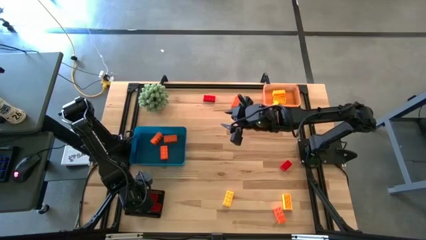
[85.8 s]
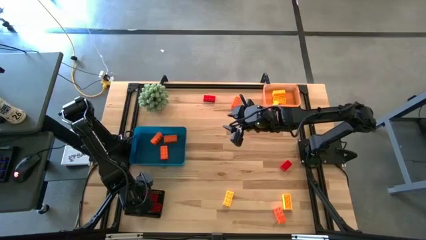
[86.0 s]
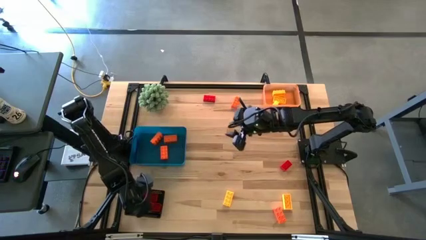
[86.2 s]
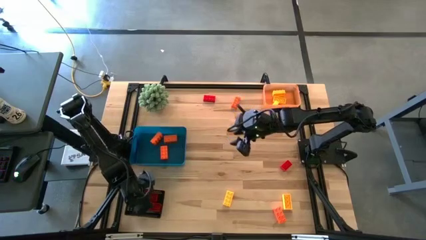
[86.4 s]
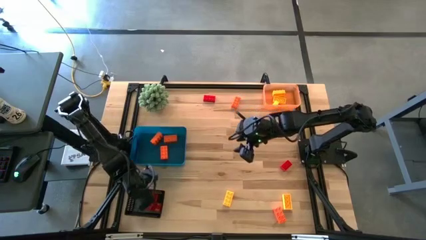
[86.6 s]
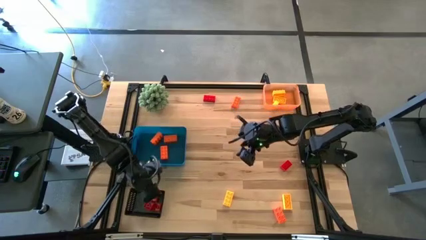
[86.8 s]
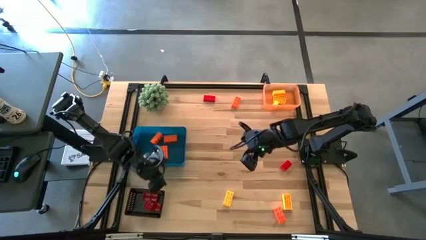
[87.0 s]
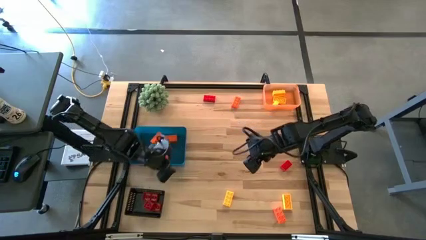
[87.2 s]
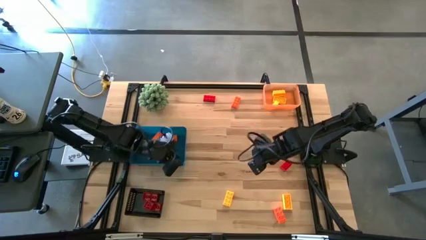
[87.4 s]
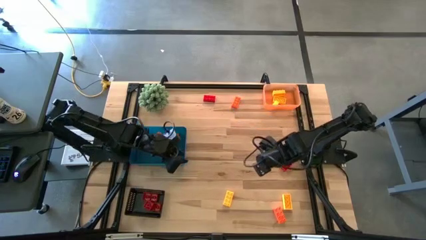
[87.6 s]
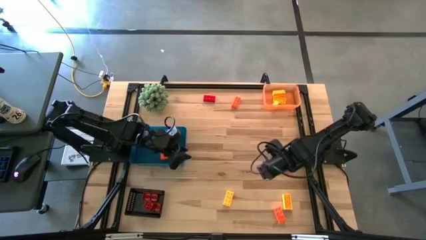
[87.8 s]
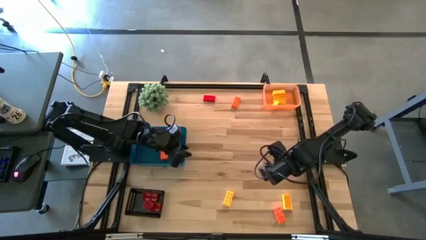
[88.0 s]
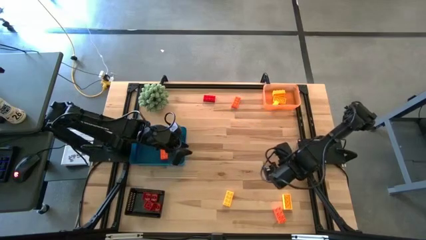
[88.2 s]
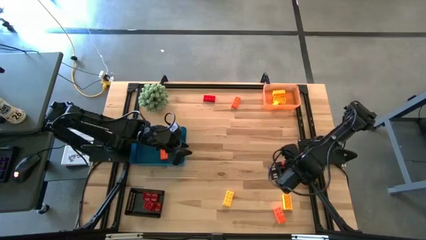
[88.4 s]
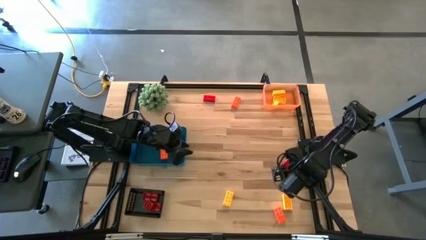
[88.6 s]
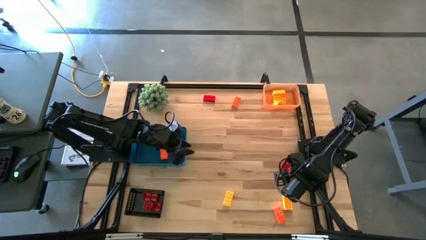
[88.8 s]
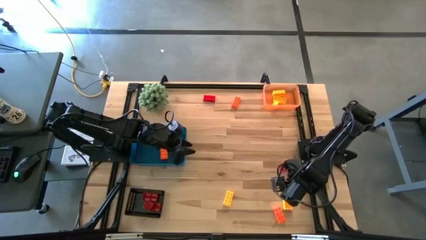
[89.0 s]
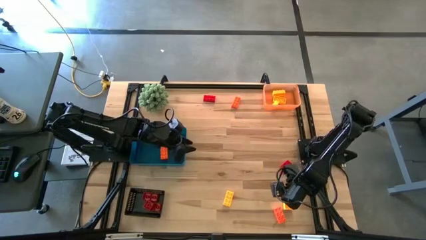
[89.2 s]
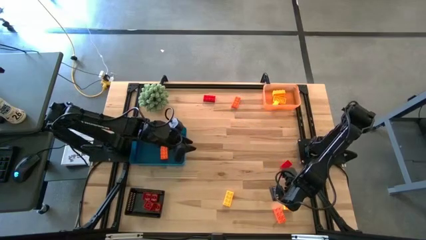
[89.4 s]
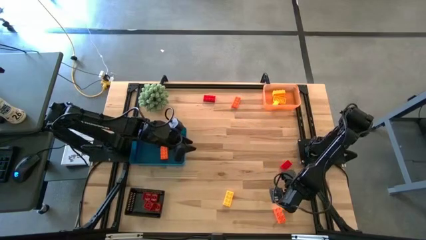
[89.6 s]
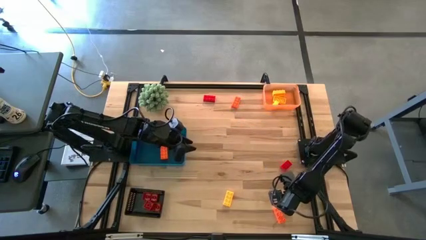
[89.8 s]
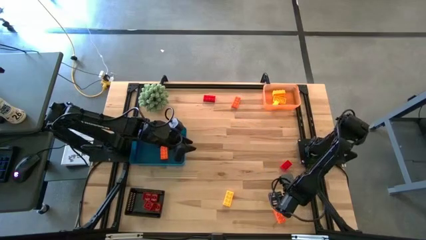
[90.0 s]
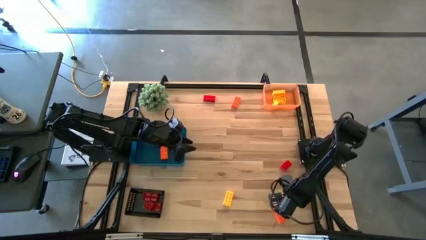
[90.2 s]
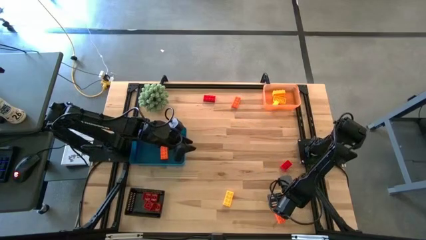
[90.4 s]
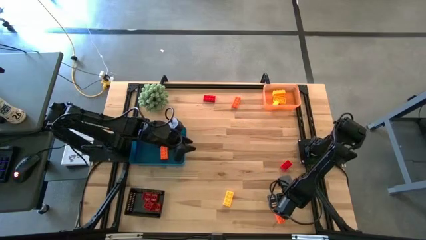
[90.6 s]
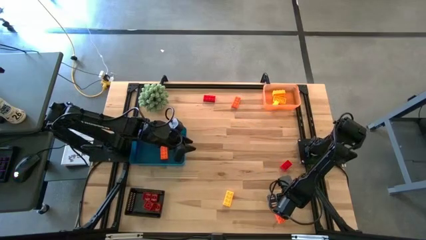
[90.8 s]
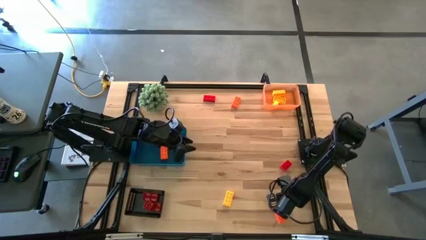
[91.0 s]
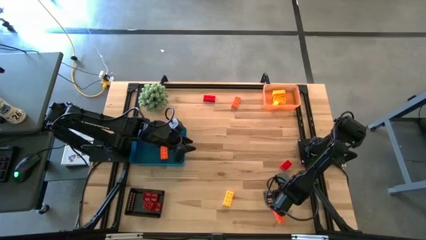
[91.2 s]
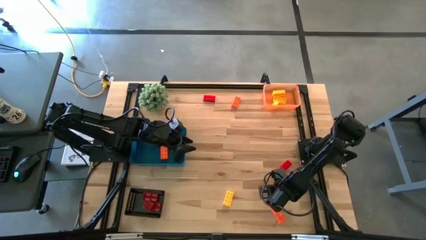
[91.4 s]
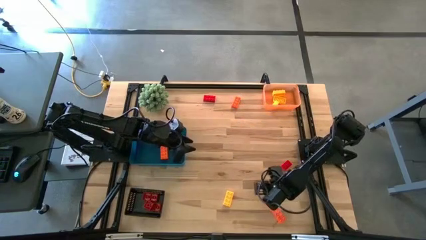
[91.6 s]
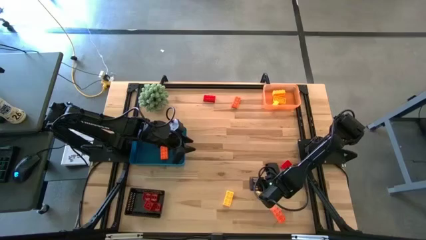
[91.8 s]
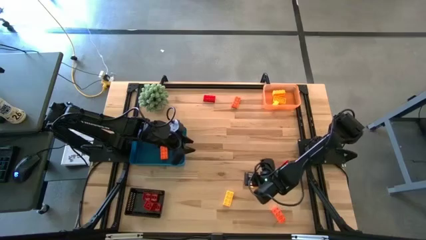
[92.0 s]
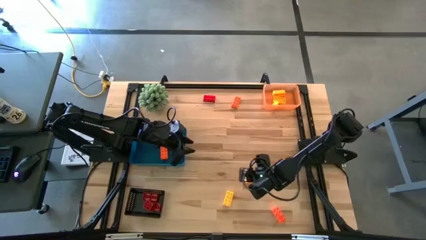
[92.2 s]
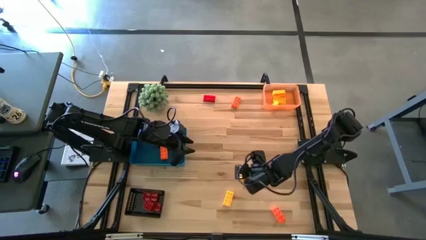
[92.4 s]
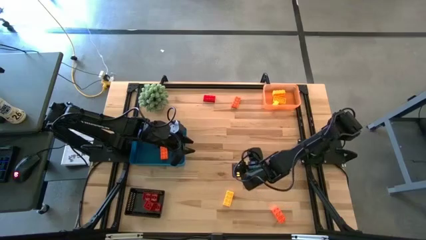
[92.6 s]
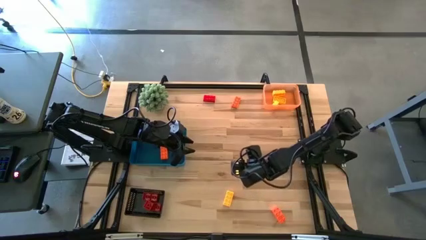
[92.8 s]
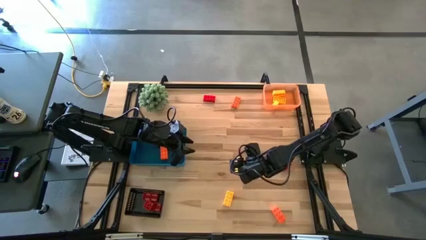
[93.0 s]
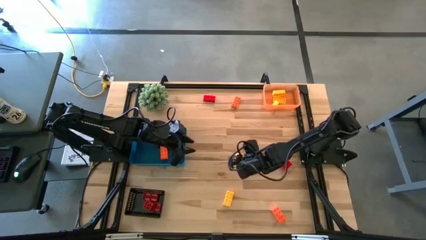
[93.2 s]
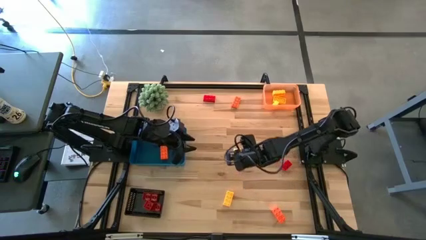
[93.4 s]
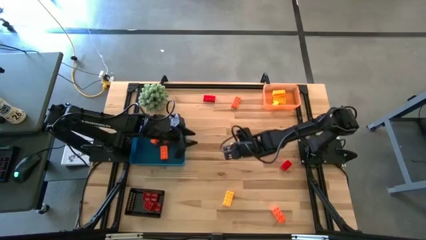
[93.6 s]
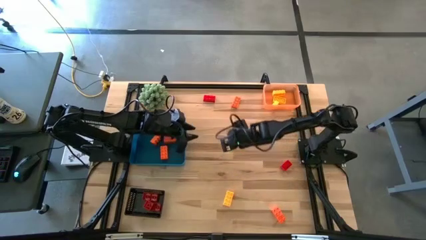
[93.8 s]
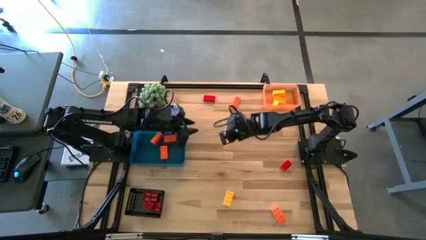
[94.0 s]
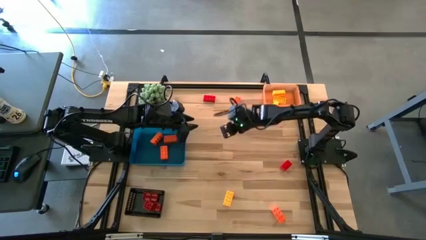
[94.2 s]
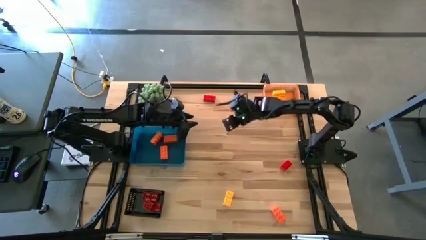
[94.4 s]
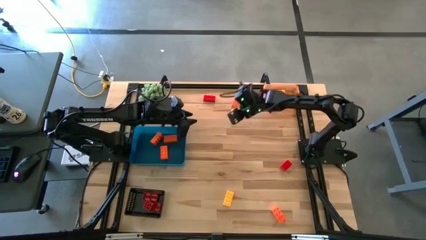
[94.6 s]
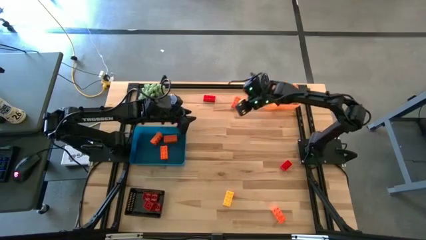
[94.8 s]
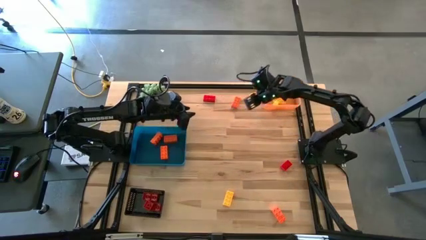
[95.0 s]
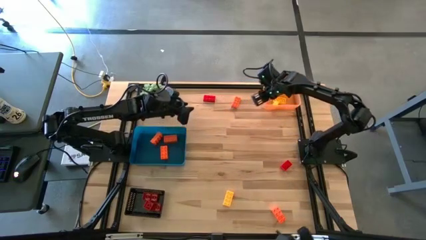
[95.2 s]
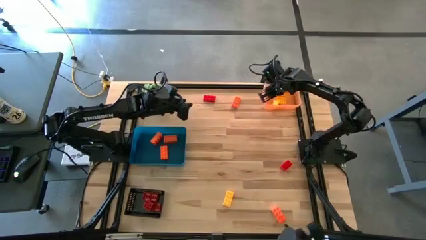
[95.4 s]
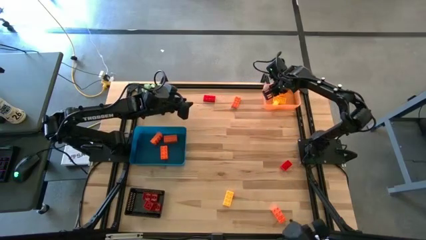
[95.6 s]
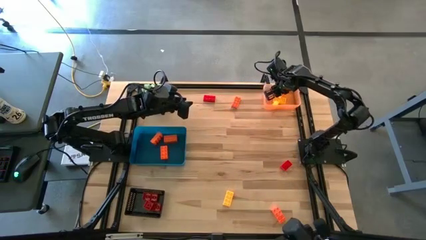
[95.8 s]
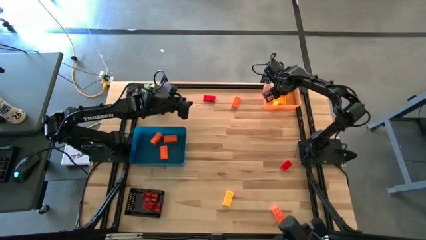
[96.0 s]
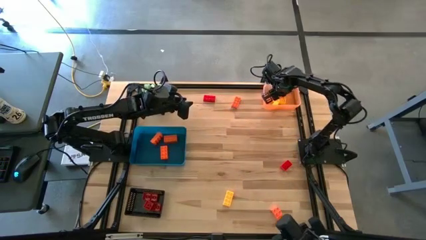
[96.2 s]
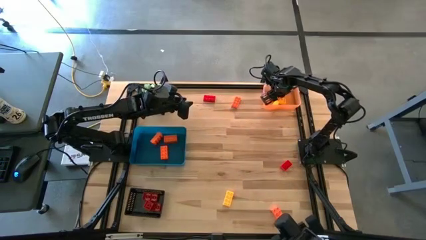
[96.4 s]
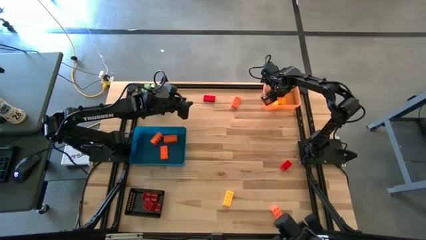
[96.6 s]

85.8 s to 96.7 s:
Task: Sort & place blocks by color
Put the yellow game piece into the orange bin

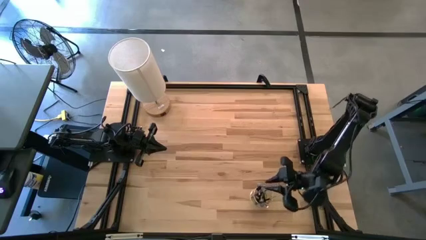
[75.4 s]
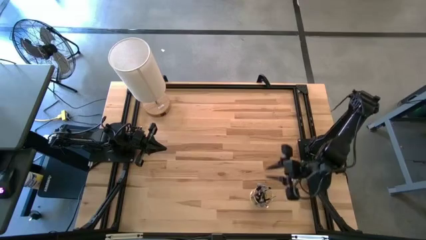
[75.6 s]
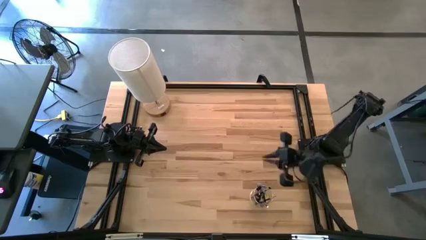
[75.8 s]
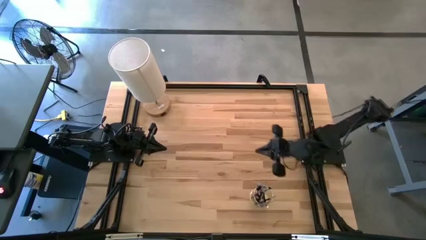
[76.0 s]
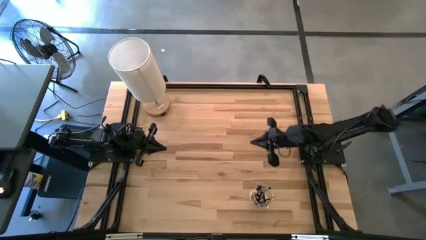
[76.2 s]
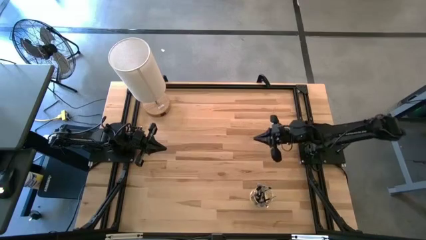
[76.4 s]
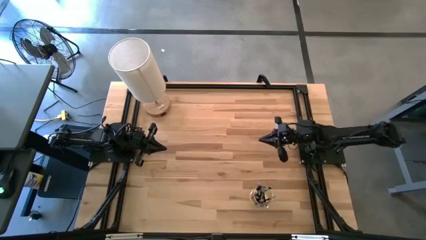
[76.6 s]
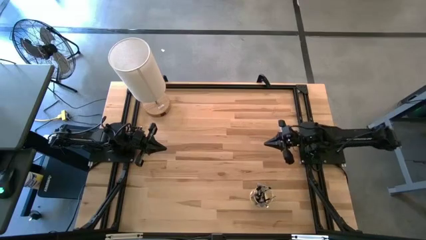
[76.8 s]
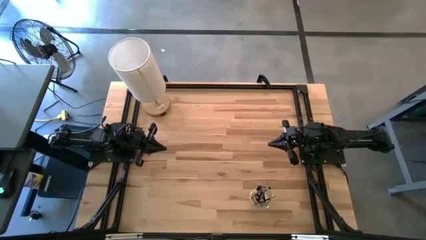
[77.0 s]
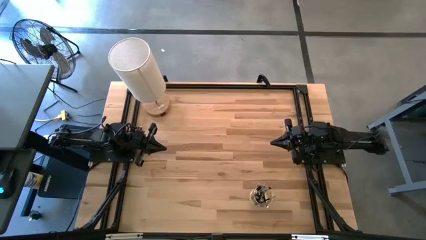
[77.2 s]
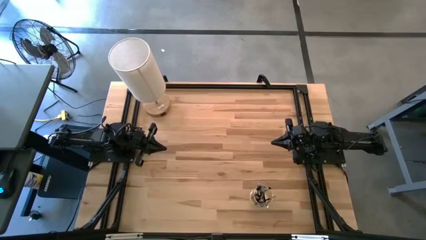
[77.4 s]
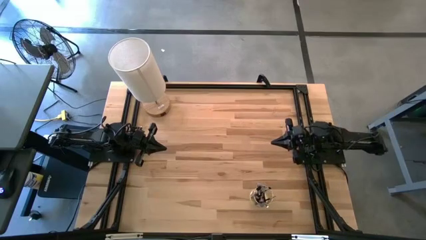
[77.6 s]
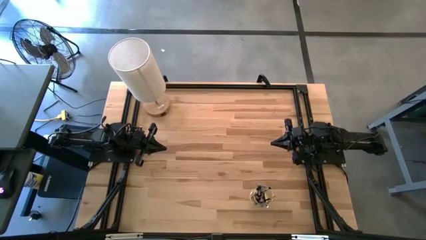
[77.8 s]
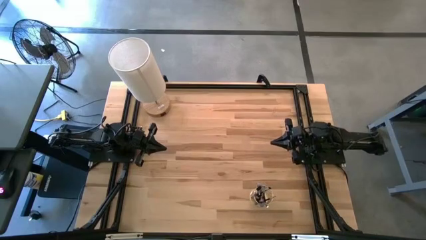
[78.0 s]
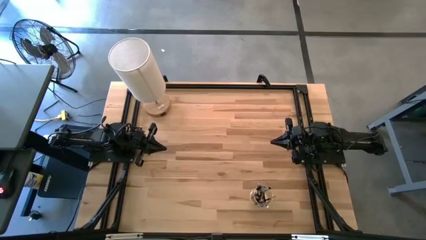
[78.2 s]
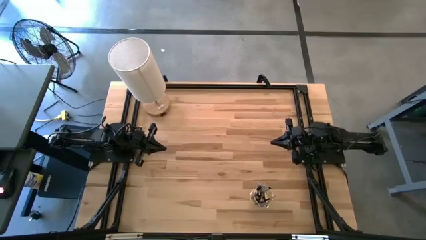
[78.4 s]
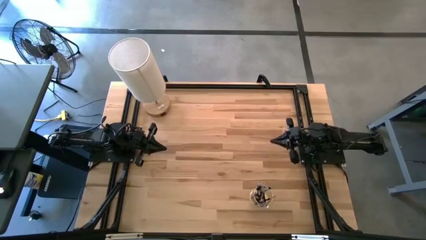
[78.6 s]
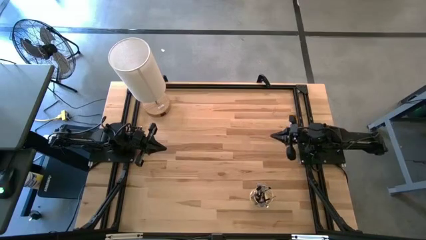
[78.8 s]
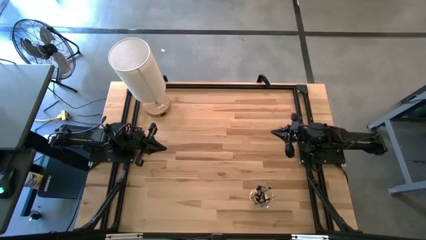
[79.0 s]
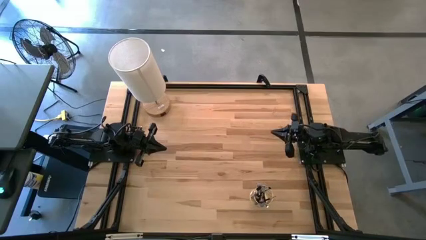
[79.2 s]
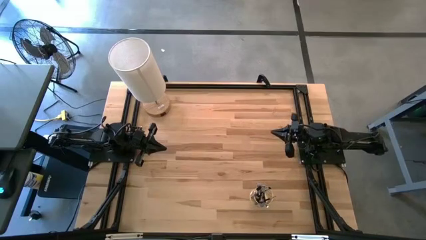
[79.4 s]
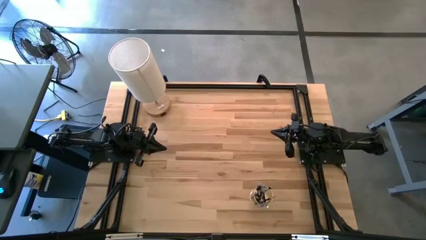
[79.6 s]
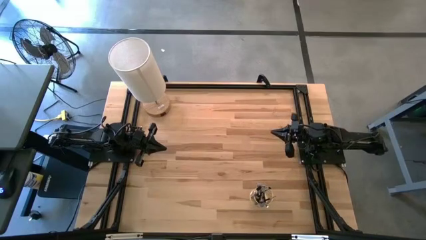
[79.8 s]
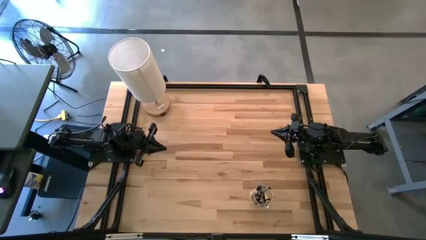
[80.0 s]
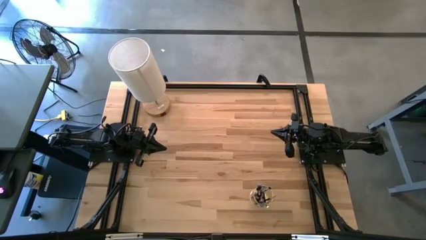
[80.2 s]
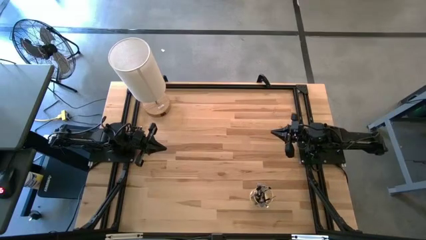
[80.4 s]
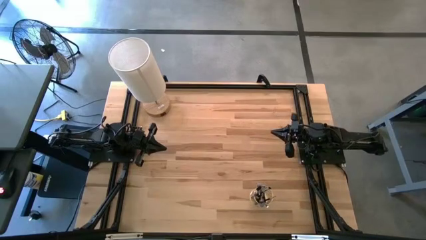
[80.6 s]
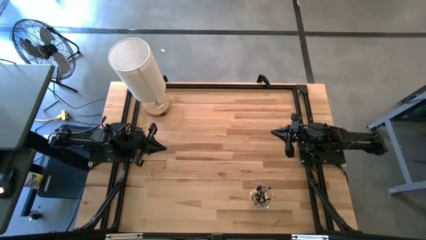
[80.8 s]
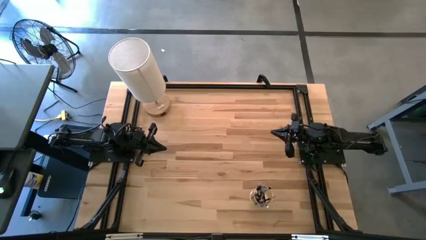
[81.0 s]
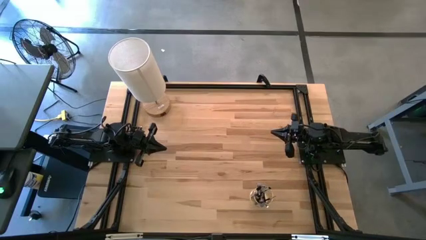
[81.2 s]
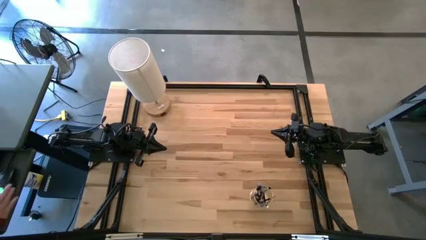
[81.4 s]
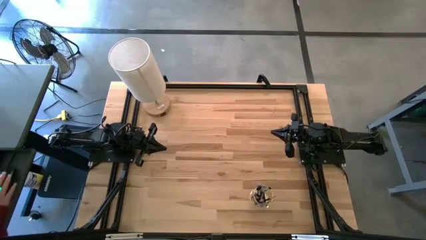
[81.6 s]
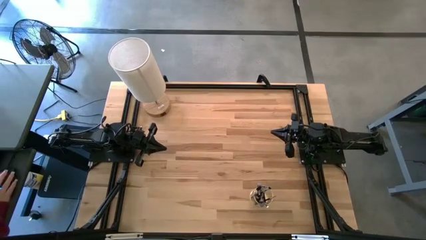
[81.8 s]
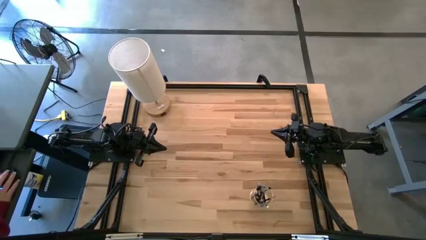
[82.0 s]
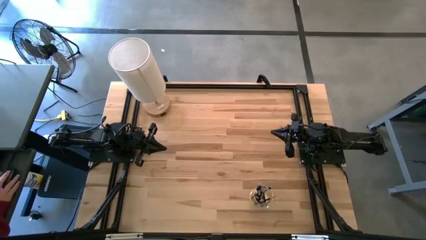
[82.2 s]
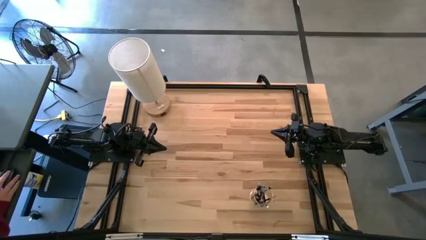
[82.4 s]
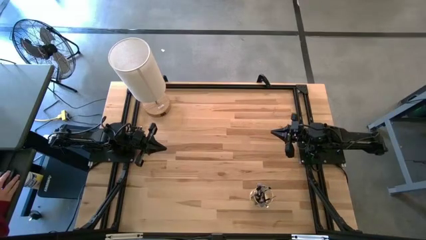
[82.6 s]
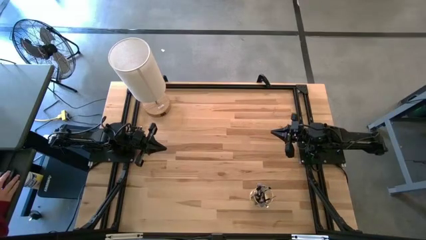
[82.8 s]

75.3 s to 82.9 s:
Task: Pick & Place Makeup Brushes
Return to Home Position
